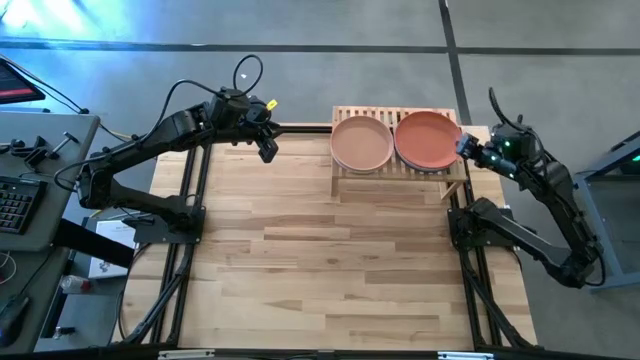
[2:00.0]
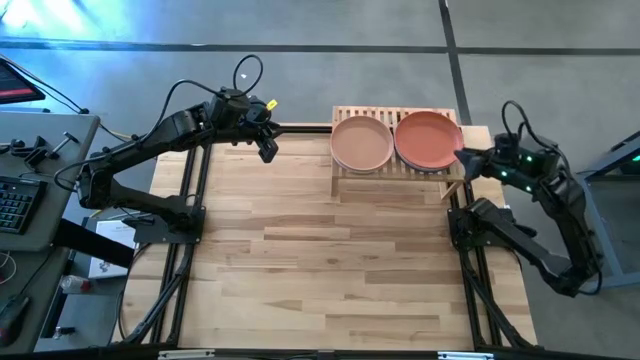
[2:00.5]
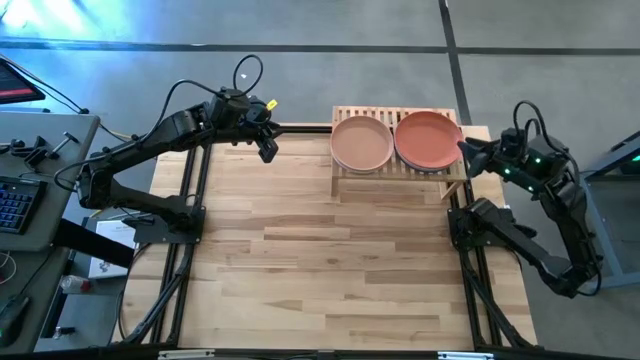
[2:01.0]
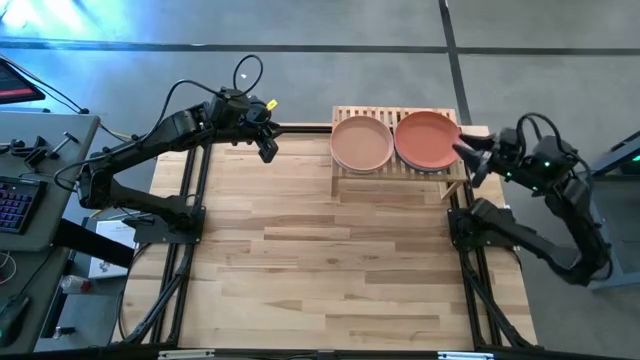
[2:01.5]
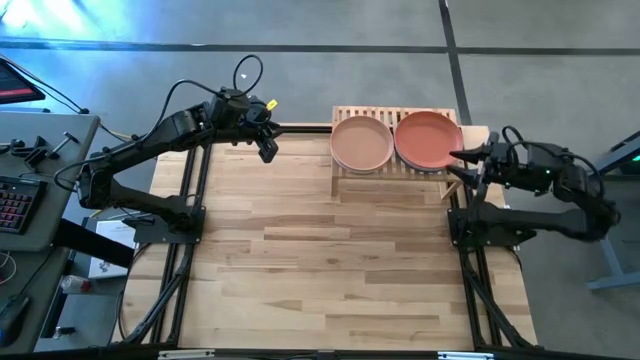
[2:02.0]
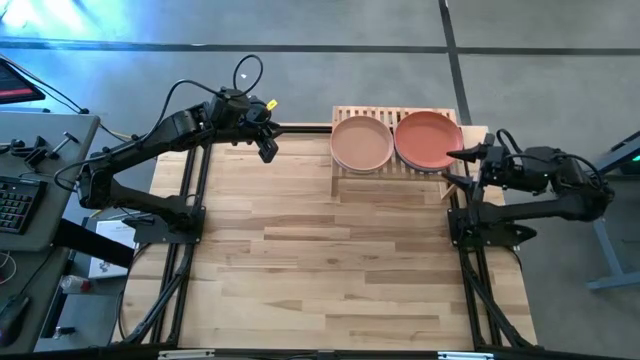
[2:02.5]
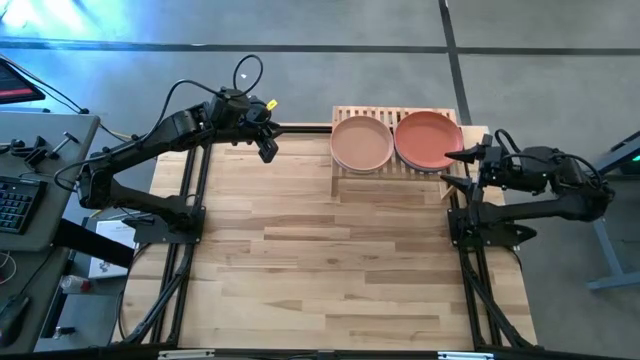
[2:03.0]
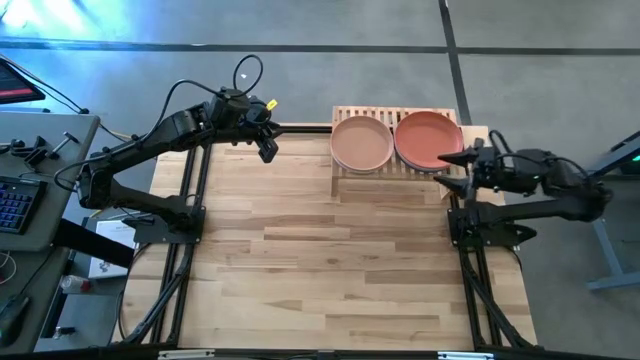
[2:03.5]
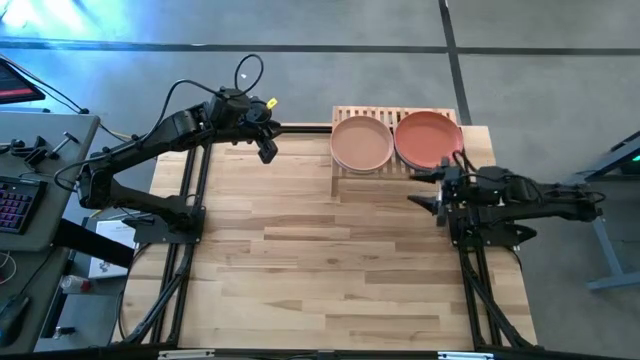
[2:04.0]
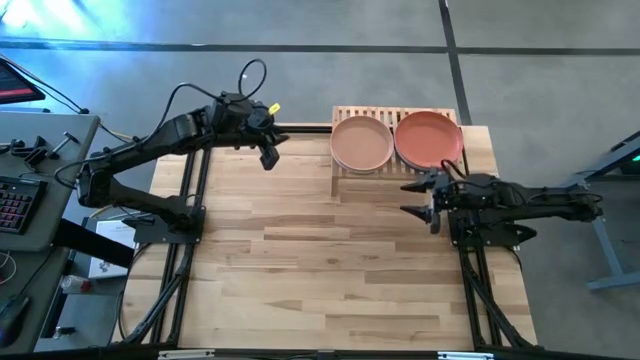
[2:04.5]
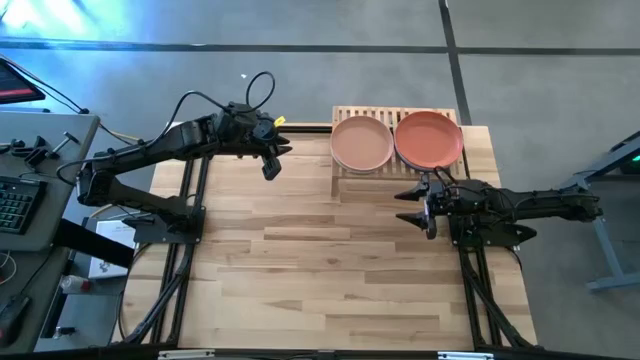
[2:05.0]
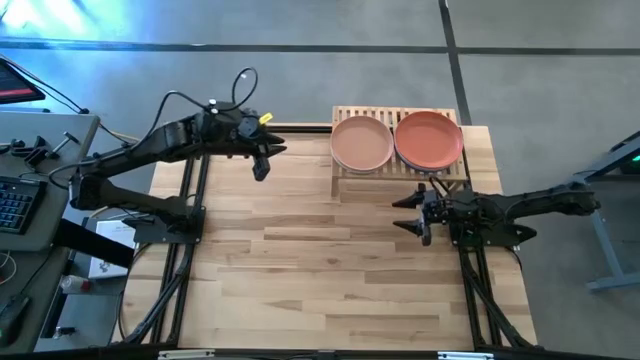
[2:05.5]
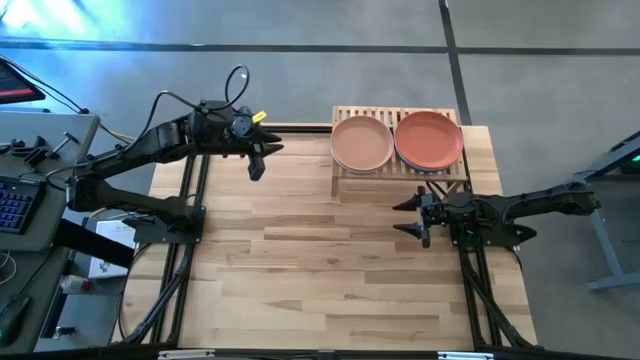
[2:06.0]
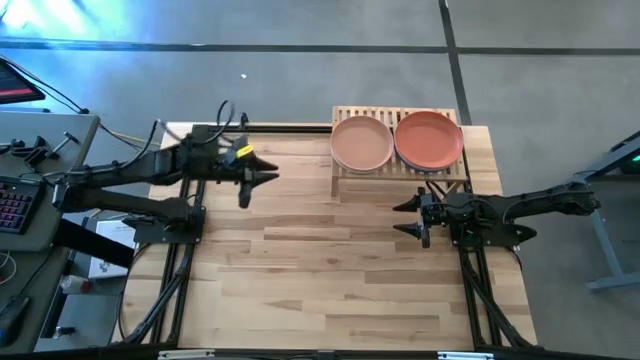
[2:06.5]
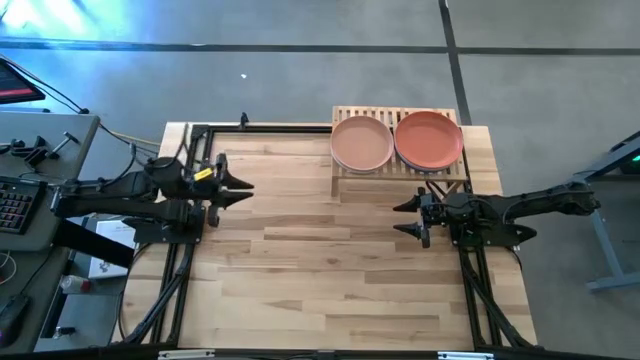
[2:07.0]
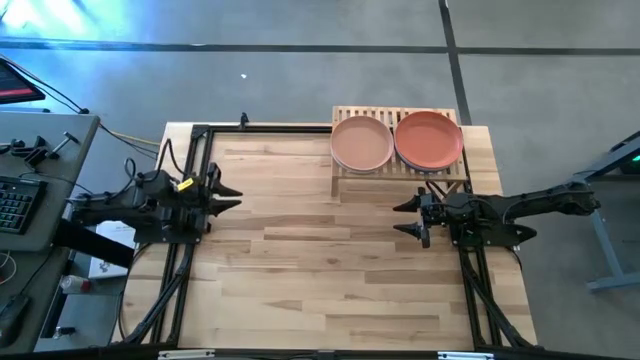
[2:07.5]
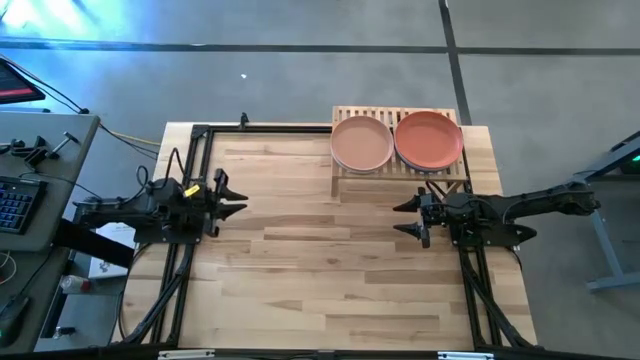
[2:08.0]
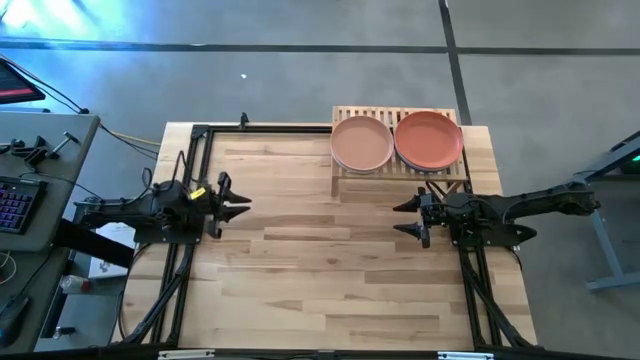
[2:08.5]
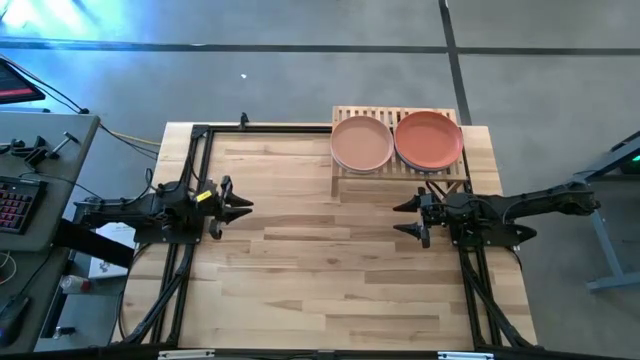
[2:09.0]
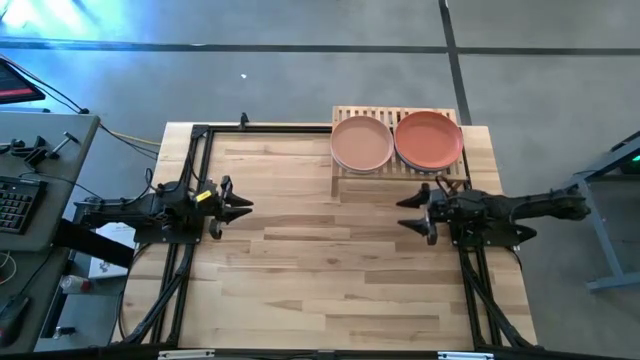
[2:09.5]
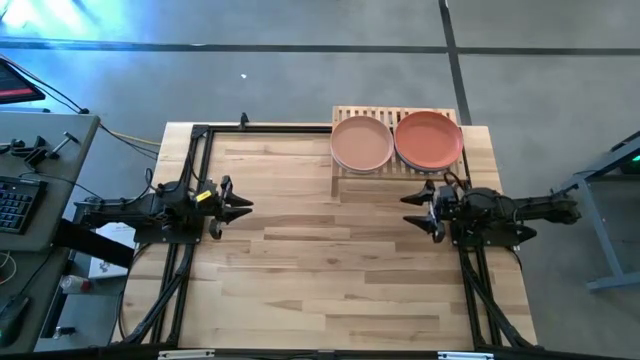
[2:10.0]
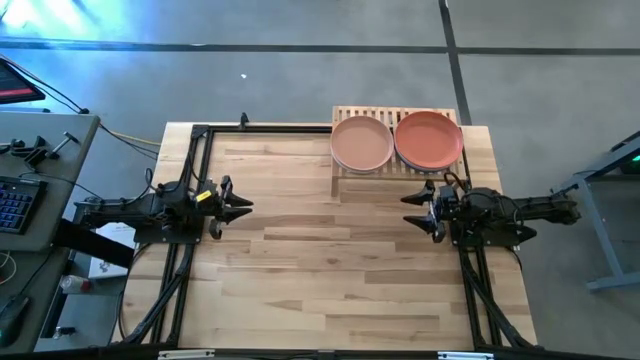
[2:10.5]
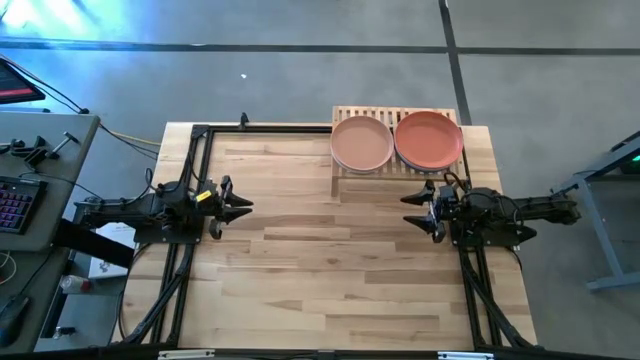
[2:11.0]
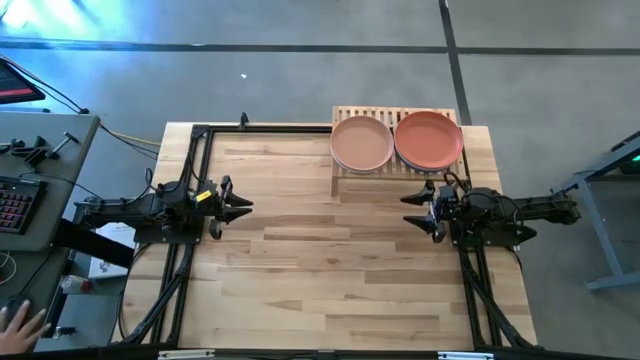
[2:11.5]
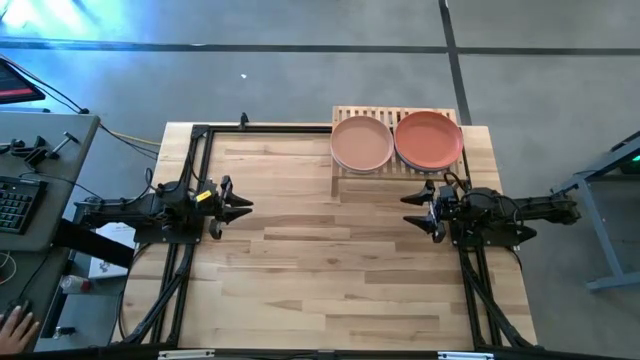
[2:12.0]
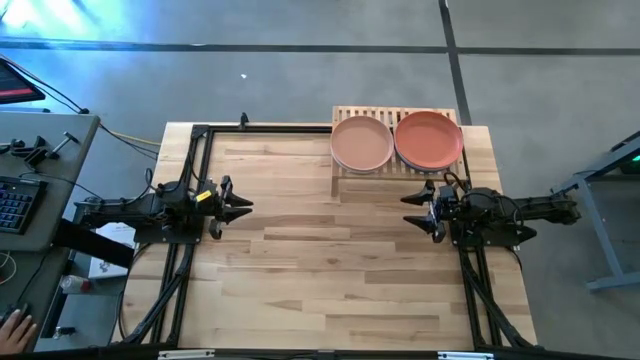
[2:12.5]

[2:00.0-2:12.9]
Task: Place and stack plates onto a shelf
Return to Home Position

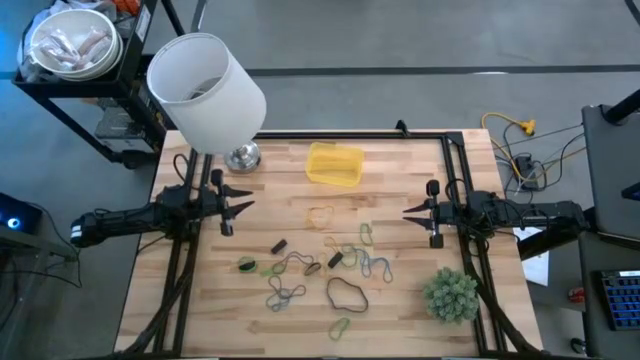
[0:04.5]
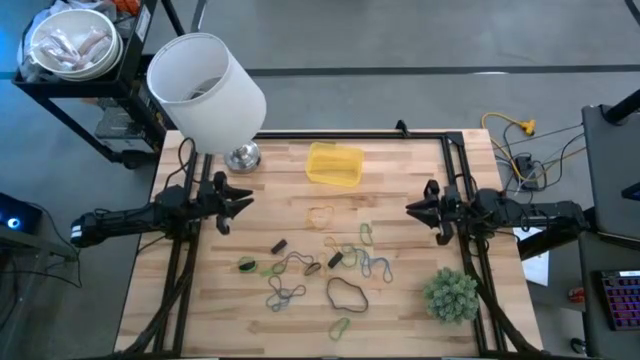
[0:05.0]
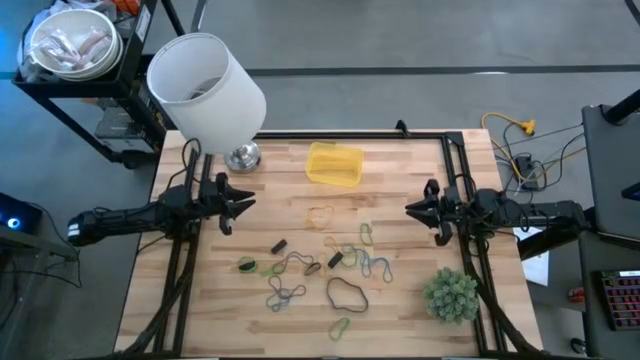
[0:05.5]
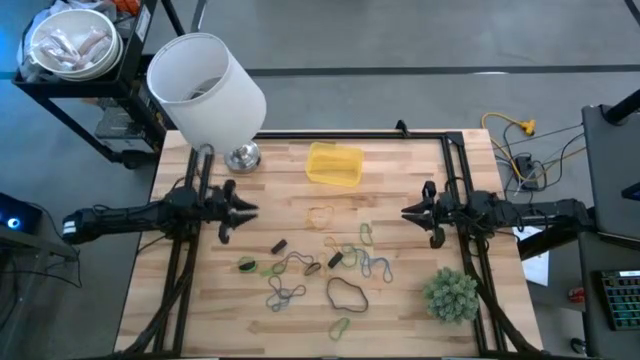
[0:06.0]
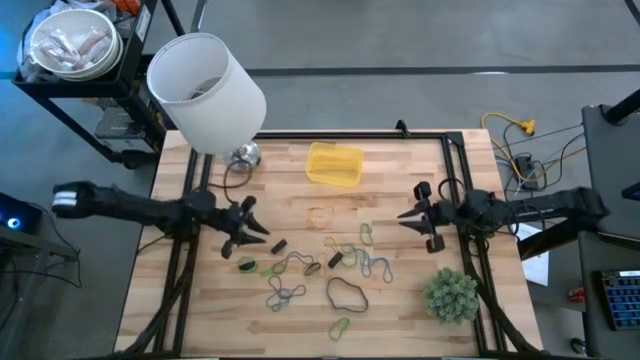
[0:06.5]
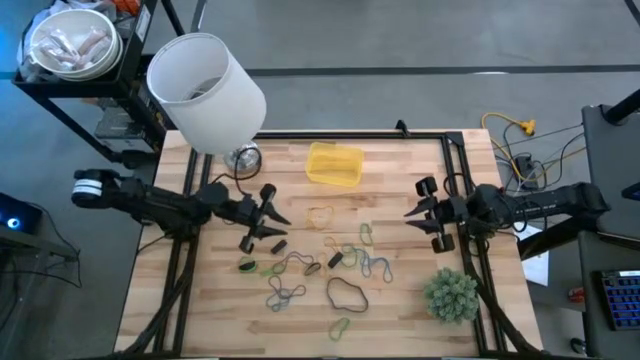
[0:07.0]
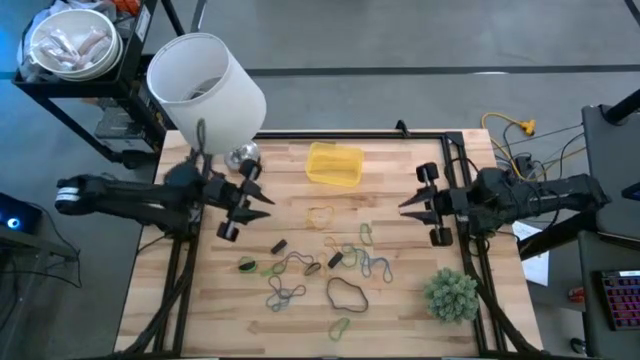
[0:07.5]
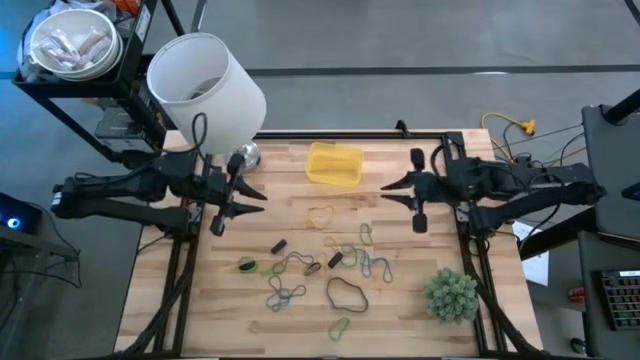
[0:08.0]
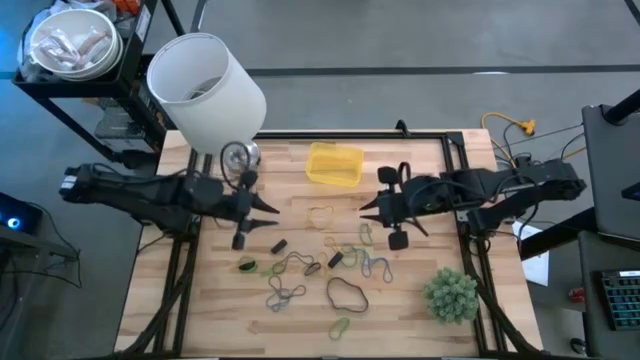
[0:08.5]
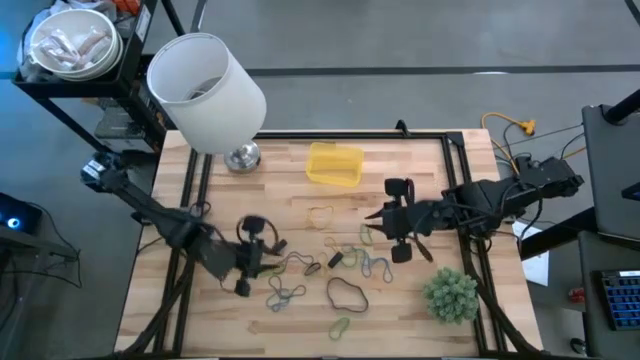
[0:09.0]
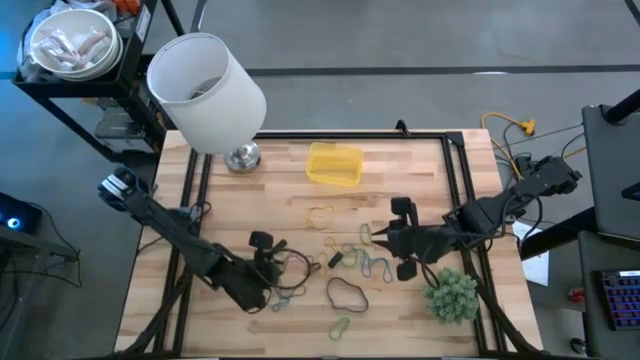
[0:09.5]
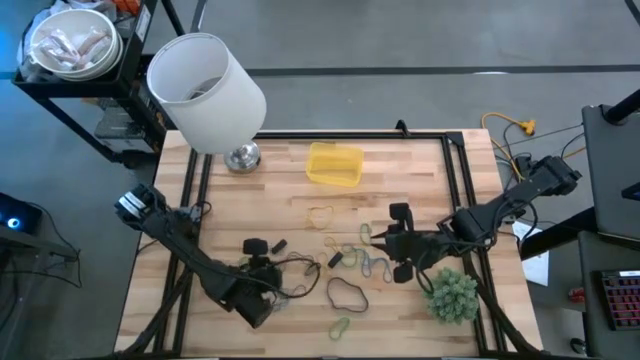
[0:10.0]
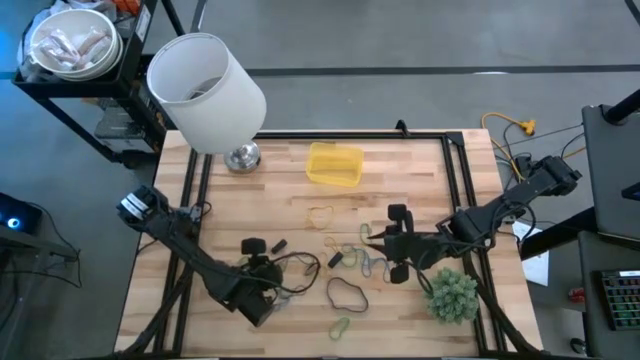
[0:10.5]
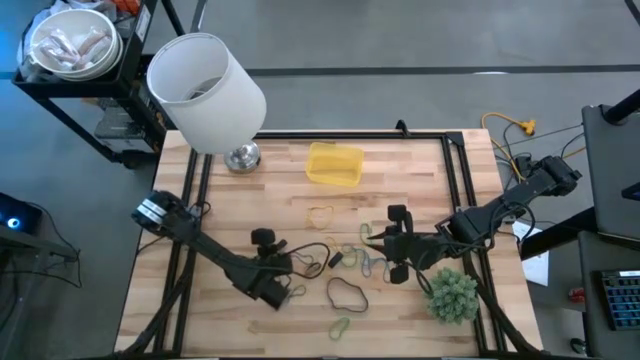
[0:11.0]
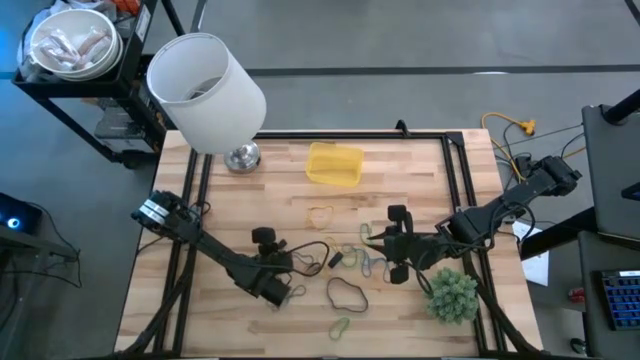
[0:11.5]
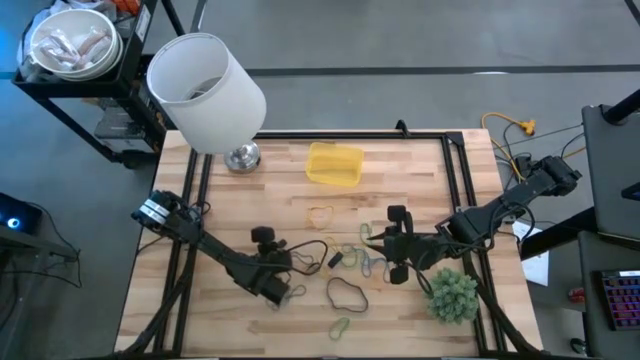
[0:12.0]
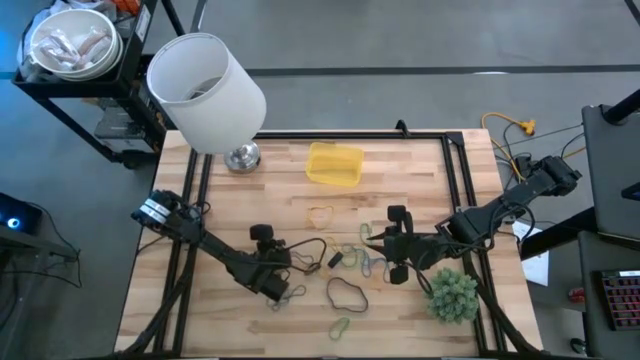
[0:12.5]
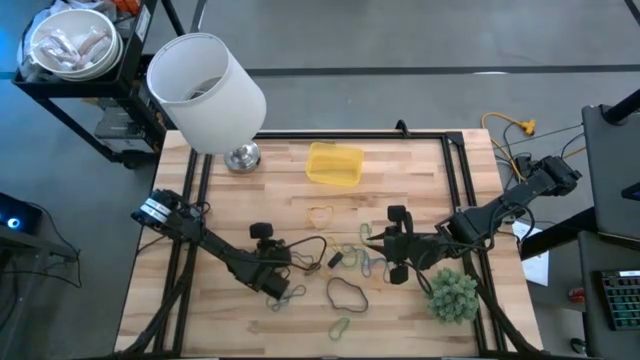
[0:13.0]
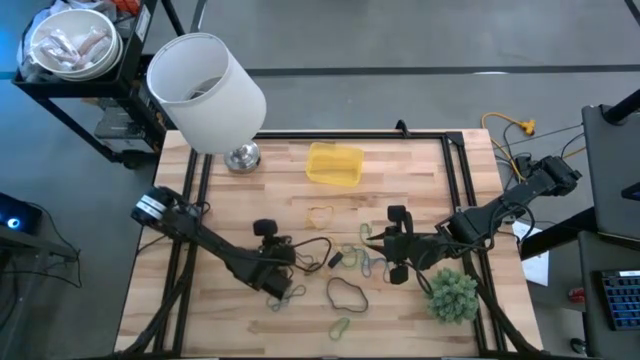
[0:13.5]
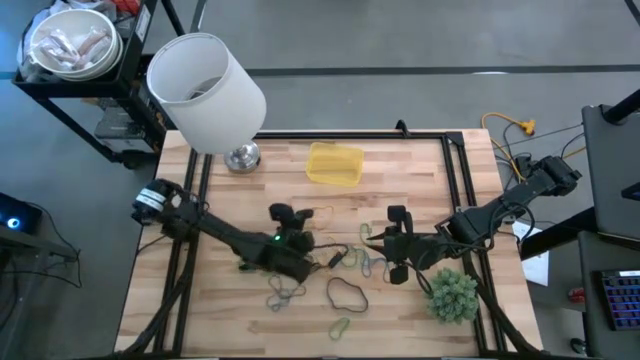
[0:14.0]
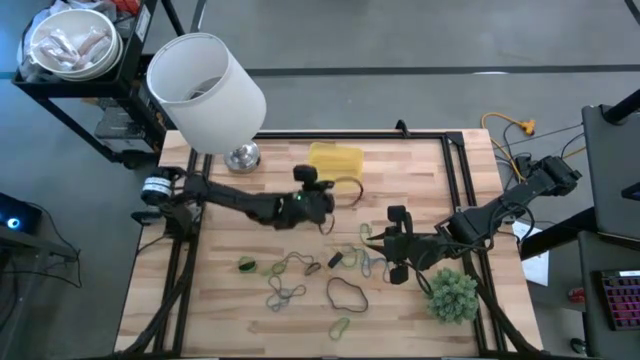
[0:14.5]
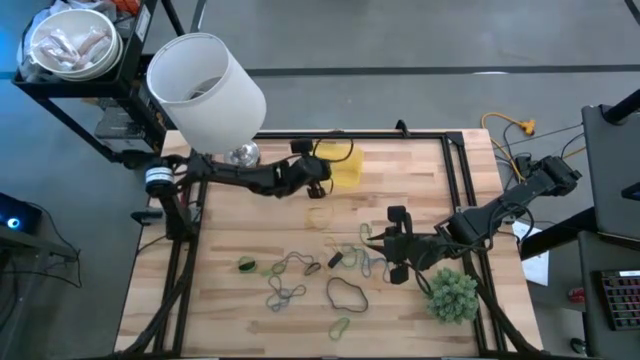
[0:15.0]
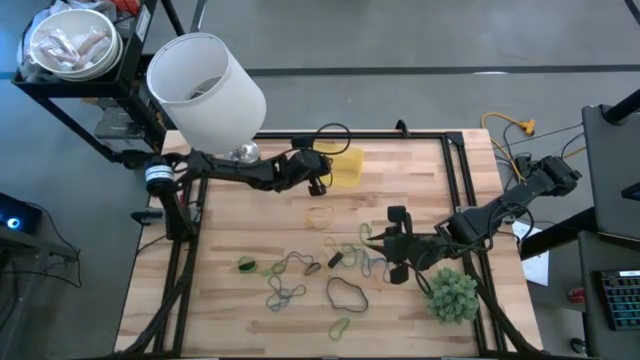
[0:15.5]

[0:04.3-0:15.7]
Task: Pick and place rubber bands into bin
Put the black rubber band into the yellow bin
